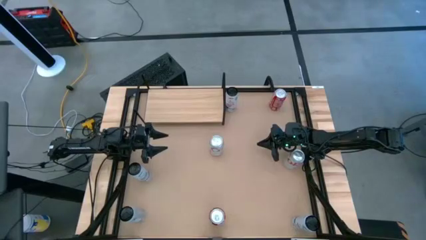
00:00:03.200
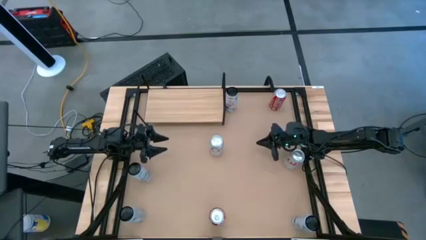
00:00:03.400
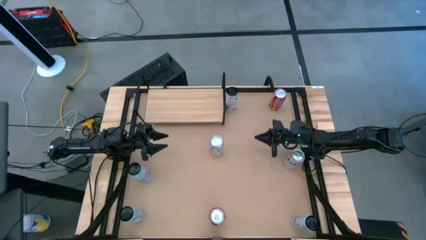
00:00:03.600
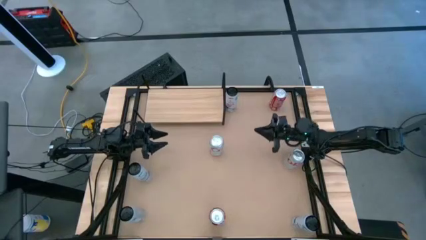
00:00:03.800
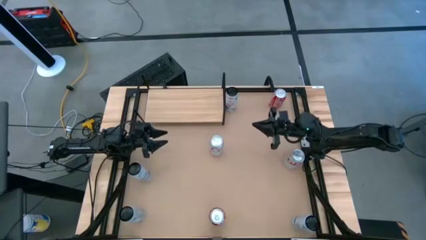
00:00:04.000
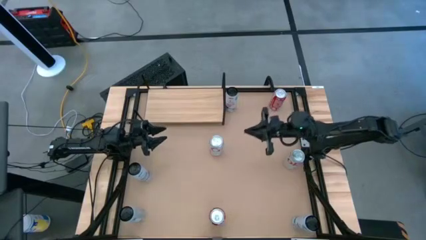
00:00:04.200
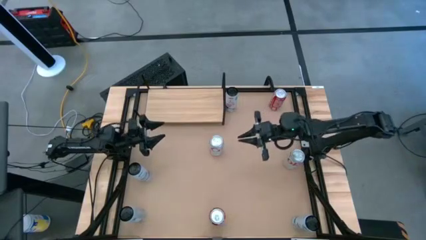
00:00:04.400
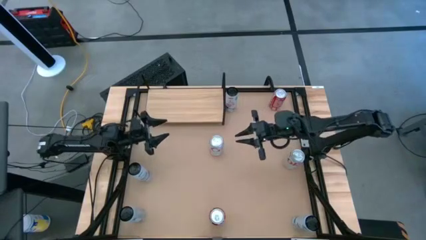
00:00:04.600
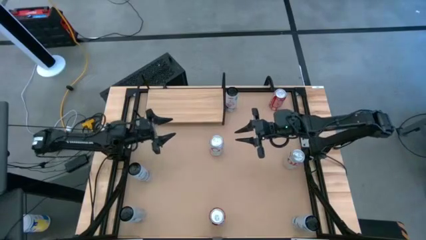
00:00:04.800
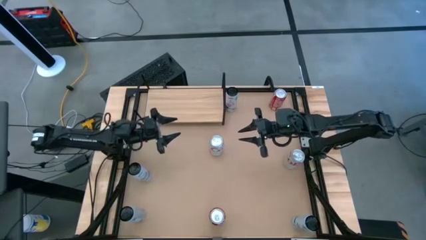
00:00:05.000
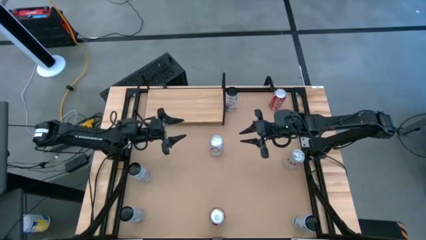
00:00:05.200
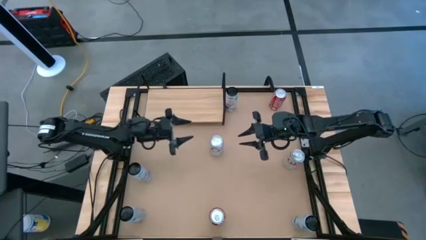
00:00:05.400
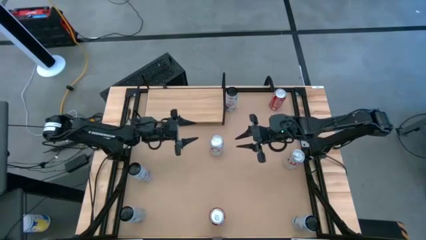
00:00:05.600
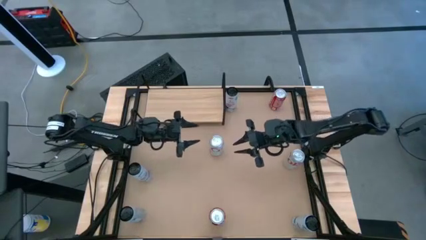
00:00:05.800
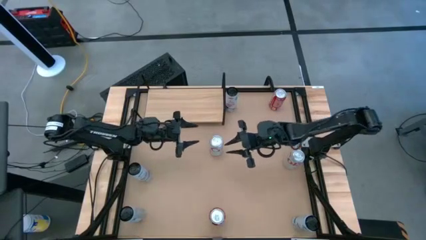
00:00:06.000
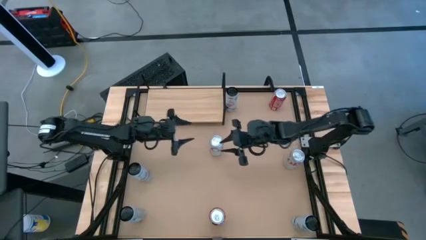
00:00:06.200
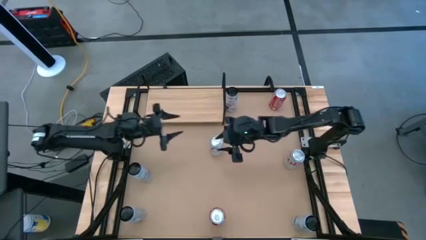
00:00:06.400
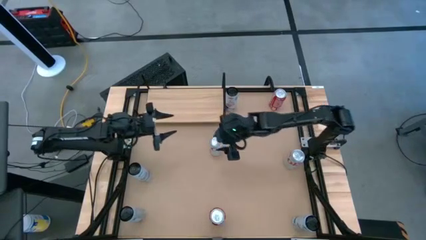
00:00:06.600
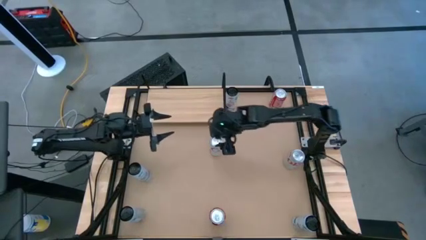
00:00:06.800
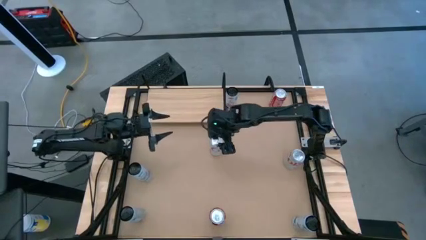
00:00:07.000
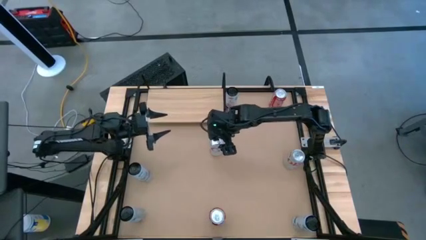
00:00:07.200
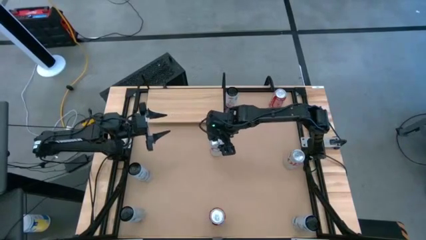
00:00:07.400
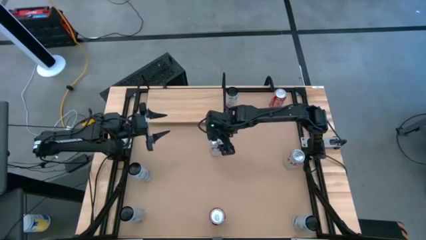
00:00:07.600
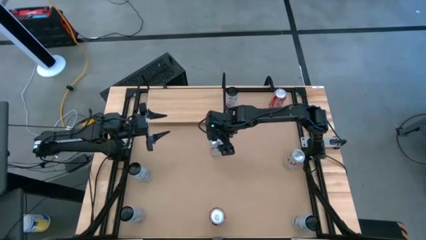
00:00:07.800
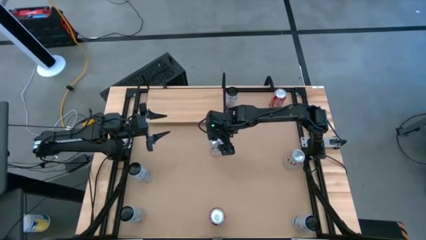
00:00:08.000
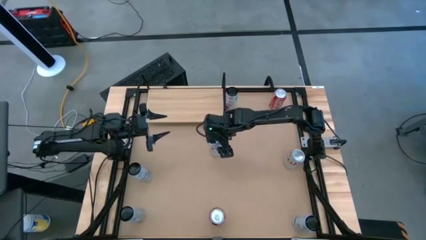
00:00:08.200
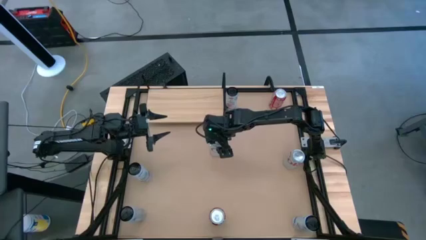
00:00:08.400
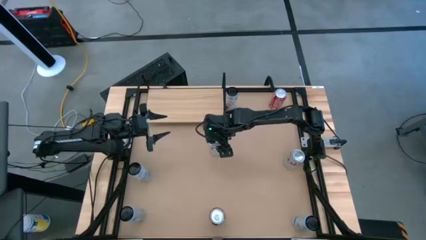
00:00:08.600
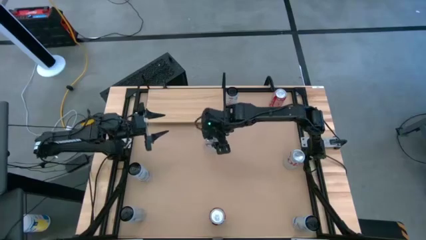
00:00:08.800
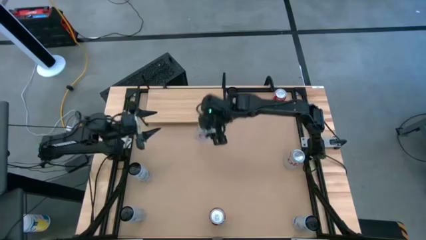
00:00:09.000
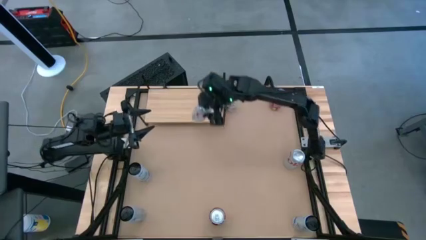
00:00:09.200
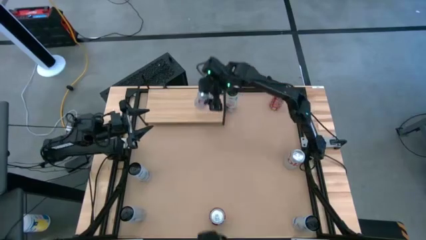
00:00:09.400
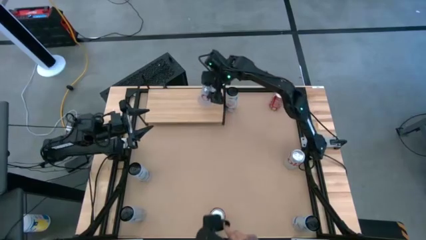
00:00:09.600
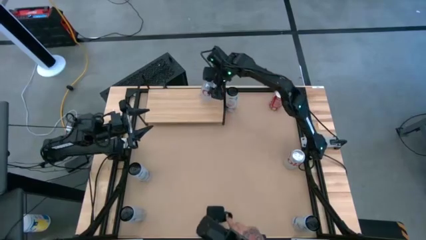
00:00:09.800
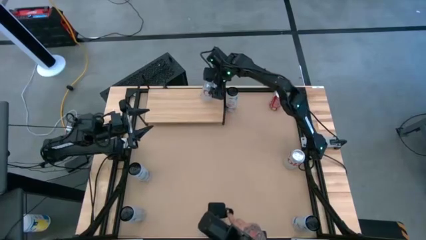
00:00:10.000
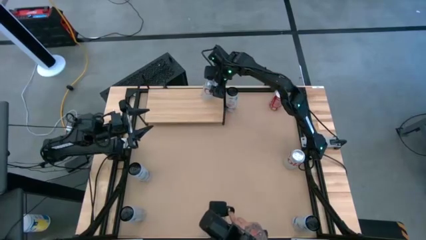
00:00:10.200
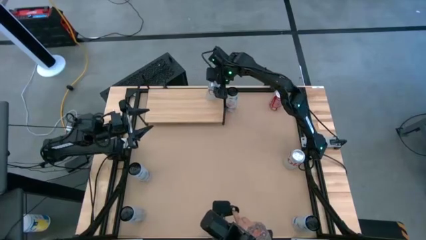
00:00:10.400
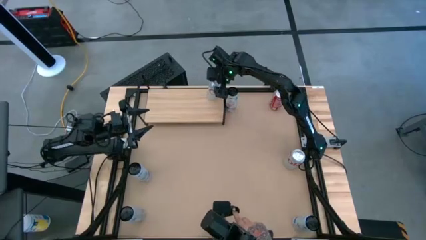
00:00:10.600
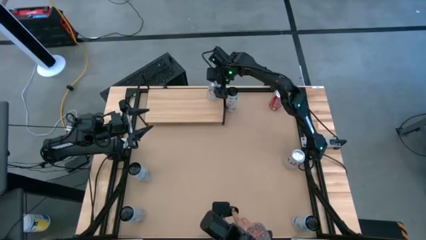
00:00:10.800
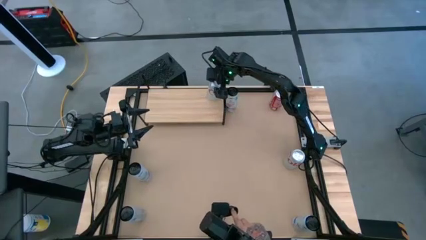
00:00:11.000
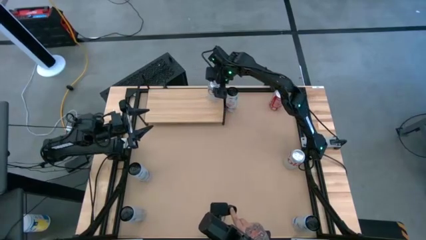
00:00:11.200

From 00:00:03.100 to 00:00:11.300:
Task: Place canned beverage on shelf
Put the left silver and red soda can on the shelf

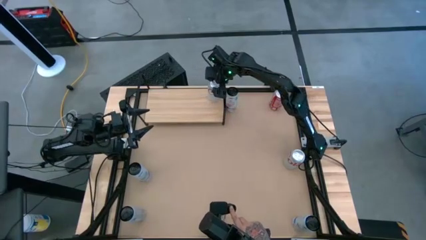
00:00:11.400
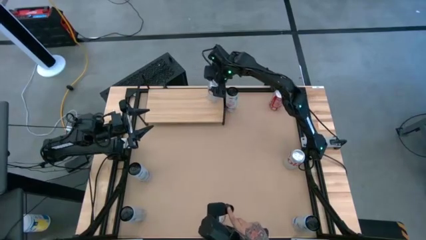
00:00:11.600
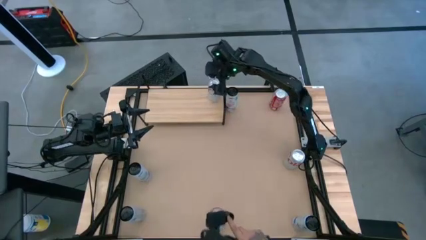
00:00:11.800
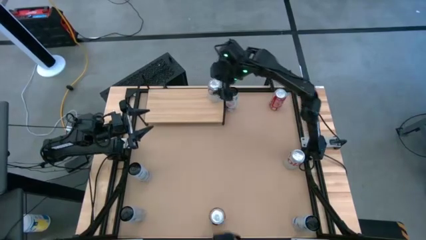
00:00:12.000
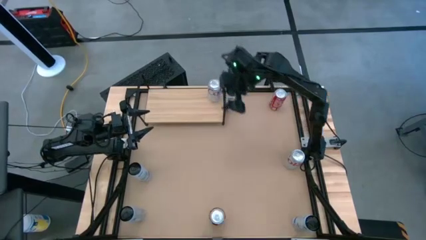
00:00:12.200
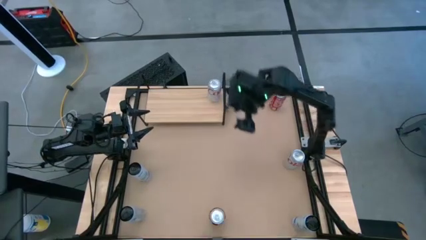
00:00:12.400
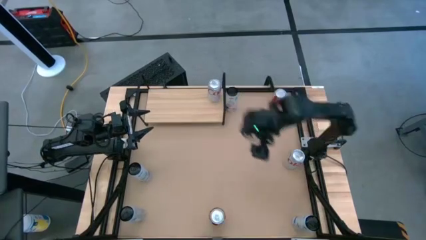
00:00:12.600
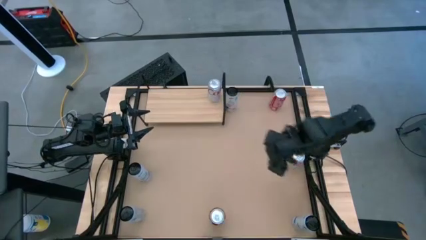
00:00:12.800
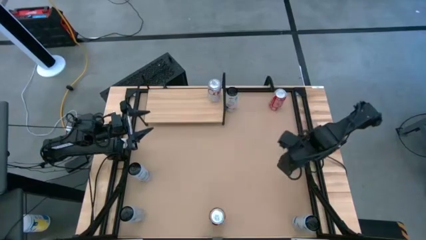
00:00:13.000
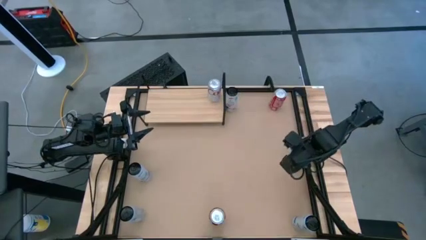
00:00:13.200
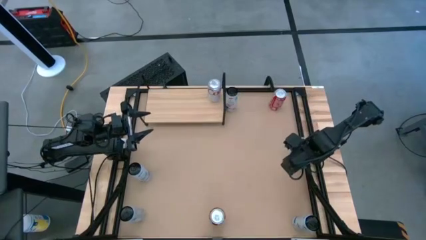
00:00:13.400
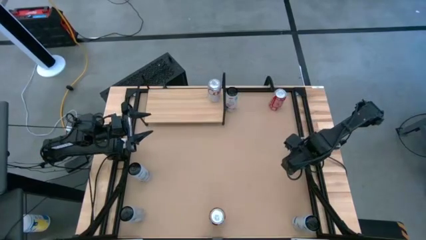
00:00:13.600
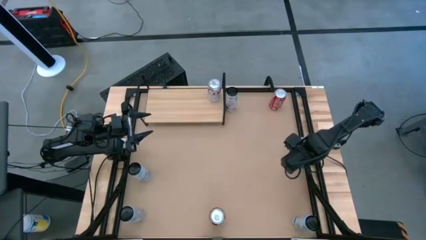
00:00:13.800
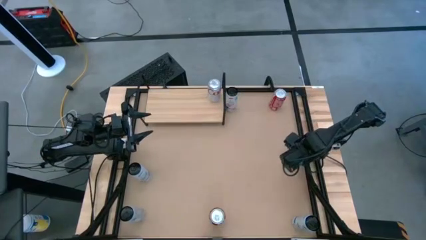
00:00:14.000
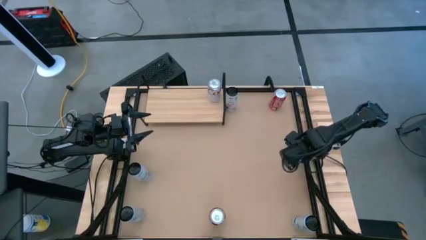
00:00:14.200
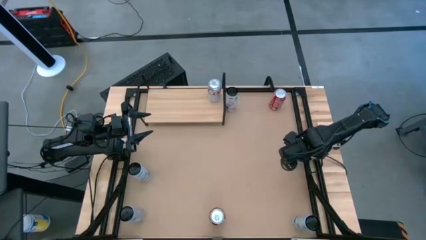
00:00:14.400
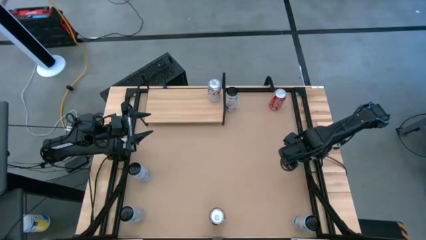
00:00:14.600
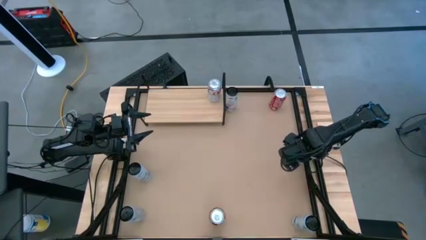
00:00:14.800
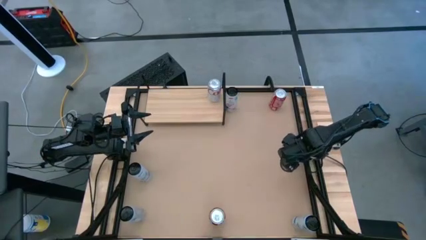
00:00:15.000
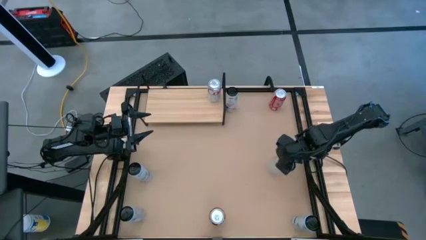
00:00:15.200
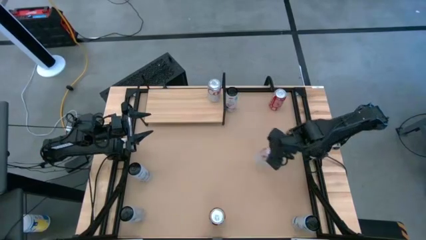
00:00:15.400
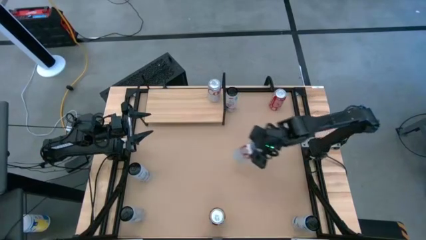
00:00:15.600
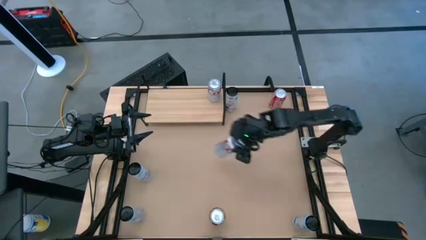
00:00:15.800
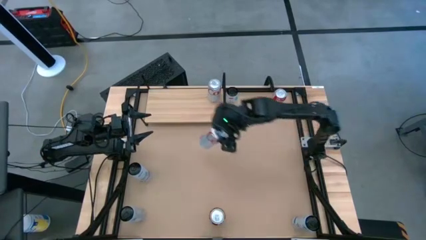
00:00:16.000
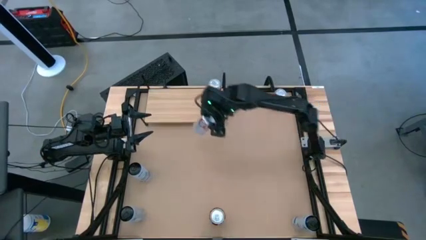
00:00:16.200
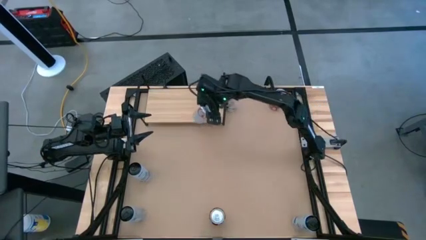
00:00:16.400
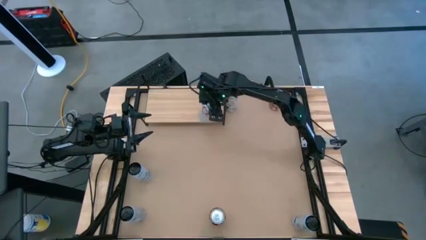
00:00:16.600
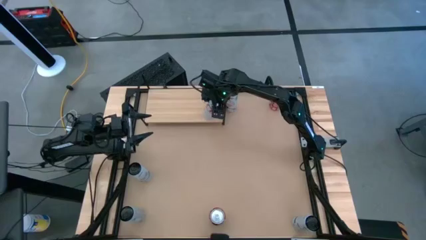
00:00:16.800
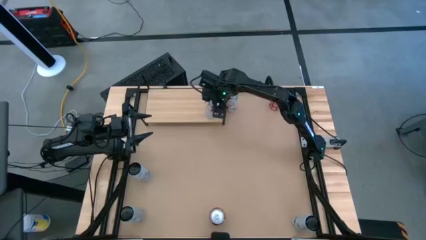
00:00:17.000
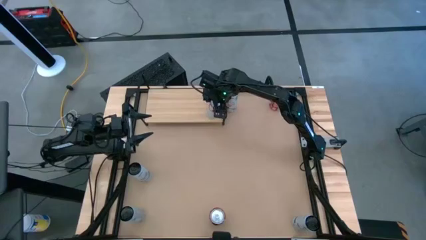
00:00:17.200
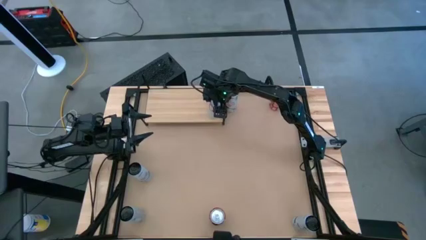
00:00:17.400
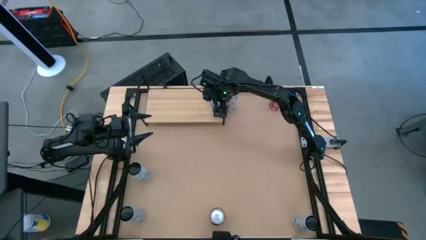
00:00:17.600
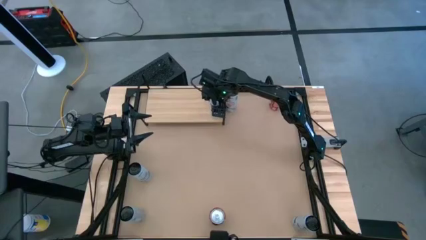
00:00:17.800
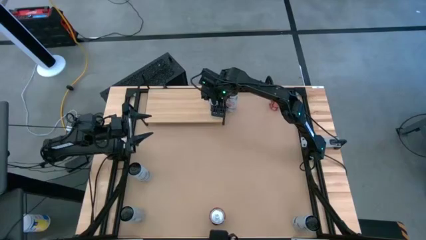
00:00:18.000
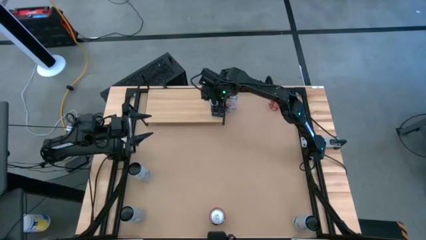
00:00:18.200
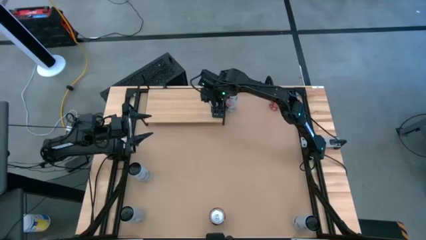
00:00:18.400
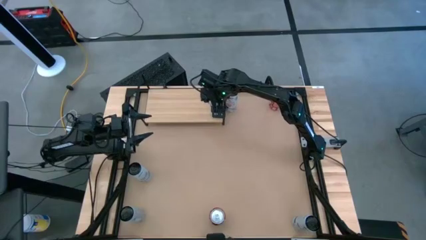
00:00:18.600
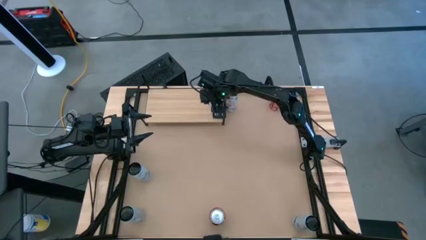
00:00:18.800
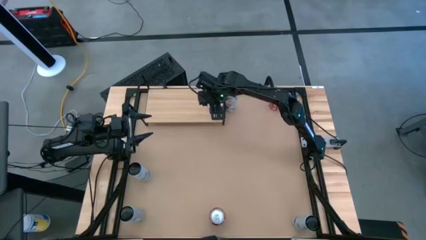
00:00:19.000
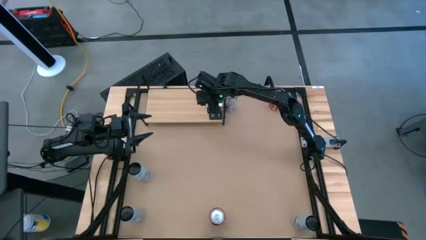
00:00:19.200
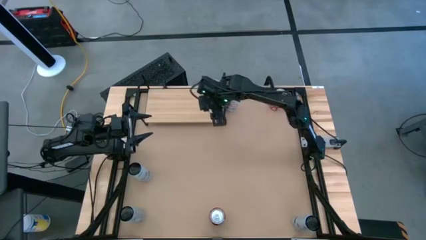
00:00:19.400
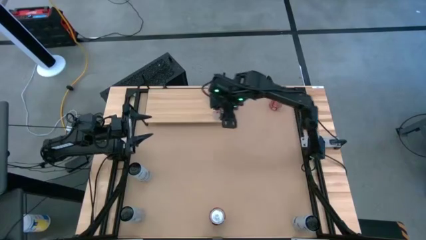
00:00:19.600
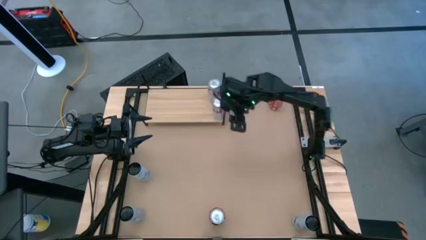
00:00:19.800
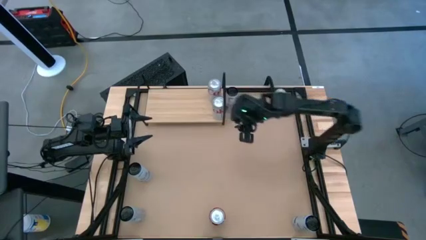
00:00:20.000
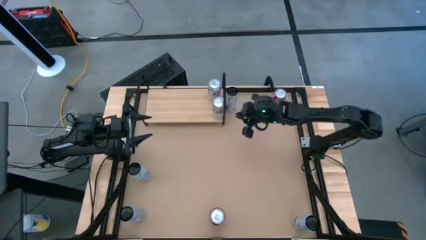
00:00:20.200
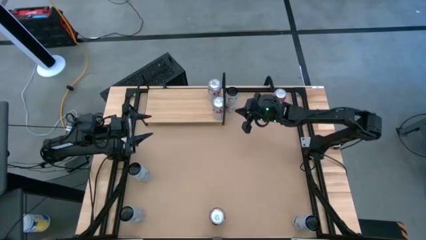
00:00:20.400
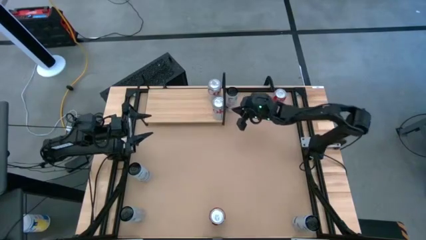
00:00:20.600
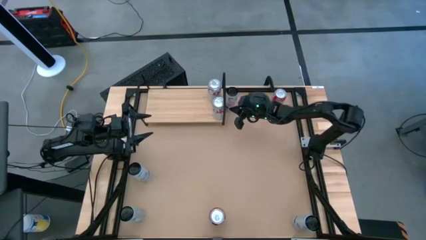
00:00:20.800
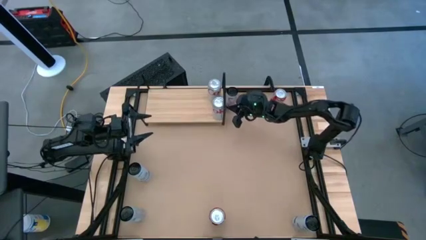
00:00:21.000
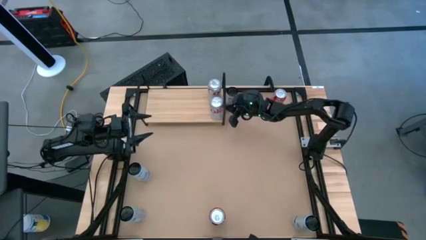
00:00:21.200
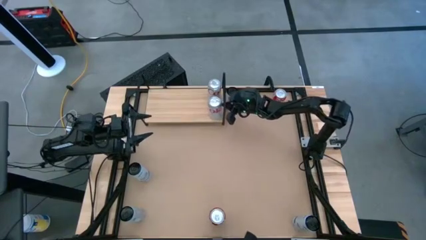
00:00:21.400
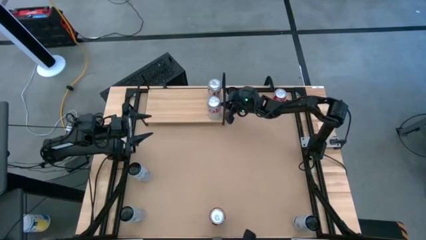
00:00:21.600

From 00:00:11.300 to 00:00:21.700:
Put the silver and red soda can on the shelf aligned with the other silver and red soda can
